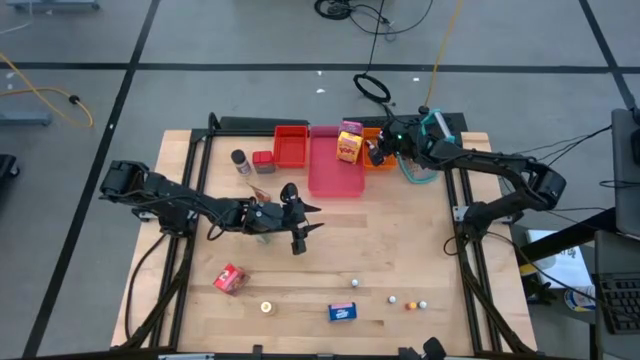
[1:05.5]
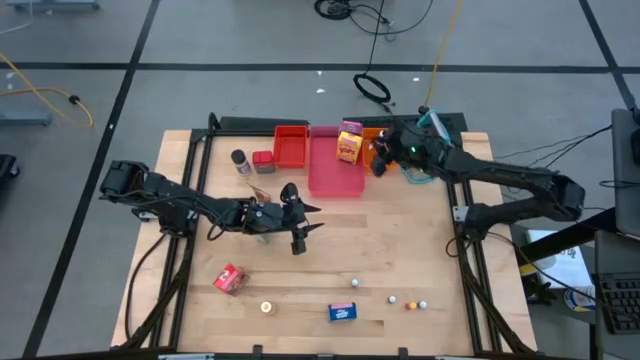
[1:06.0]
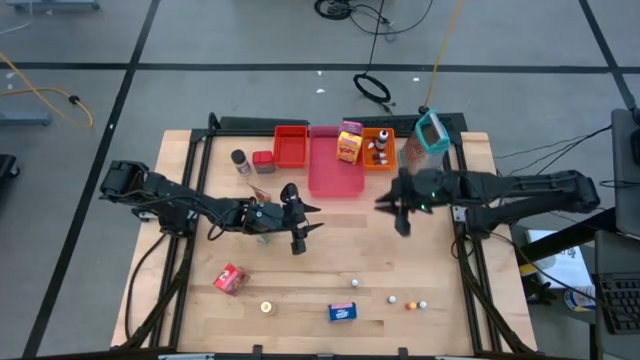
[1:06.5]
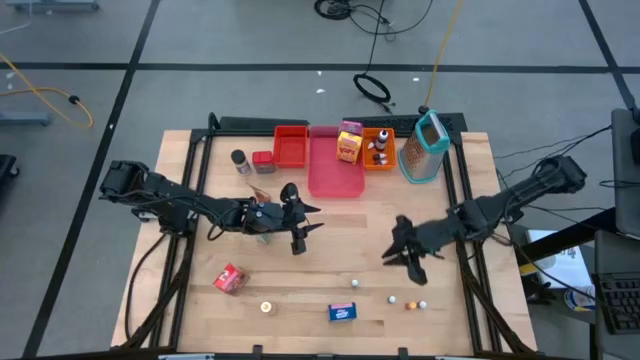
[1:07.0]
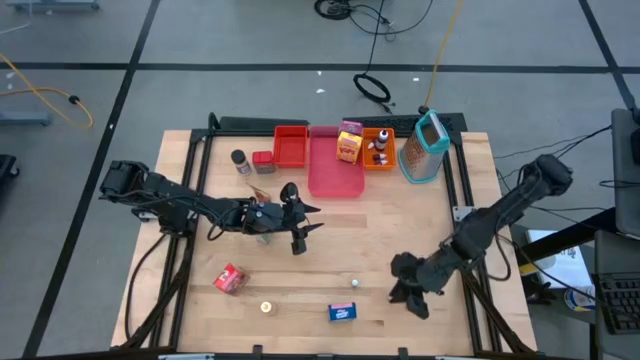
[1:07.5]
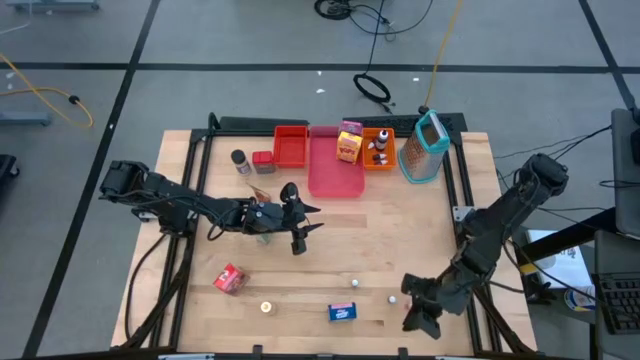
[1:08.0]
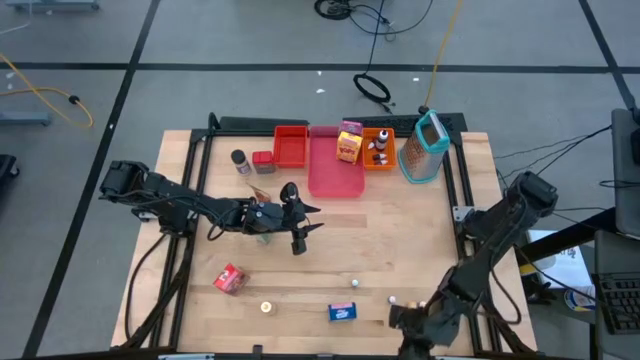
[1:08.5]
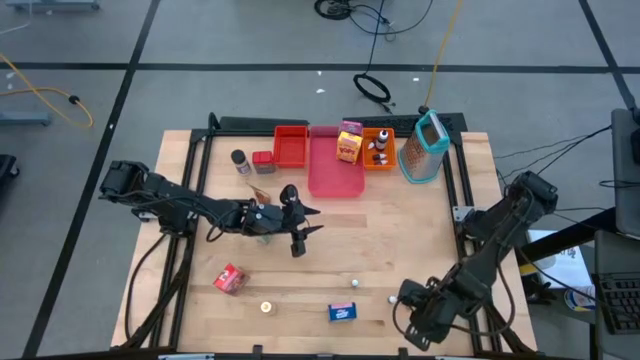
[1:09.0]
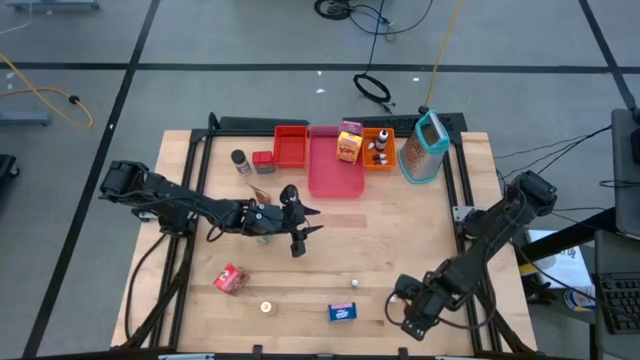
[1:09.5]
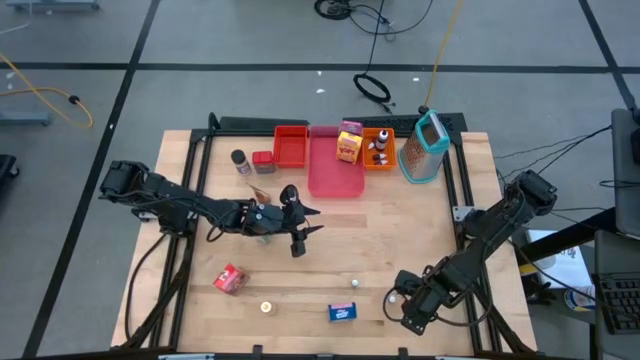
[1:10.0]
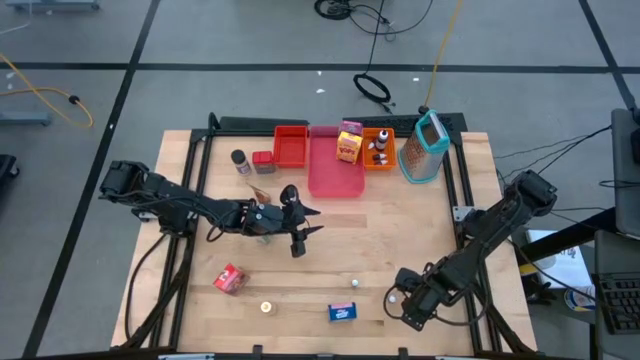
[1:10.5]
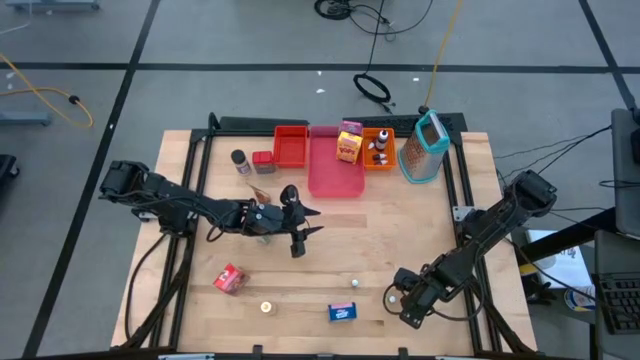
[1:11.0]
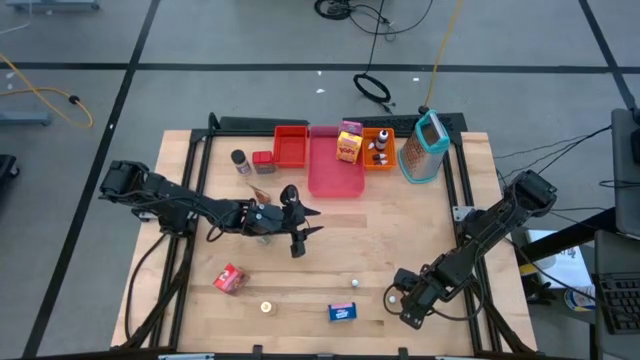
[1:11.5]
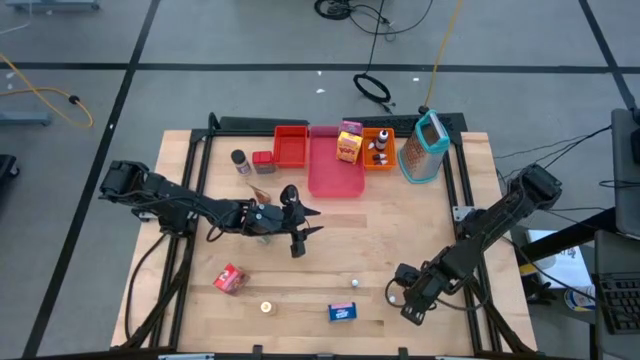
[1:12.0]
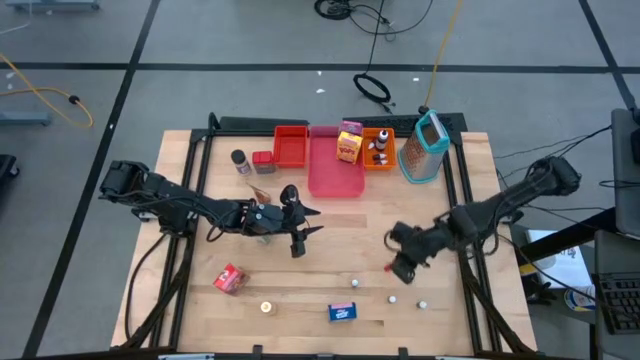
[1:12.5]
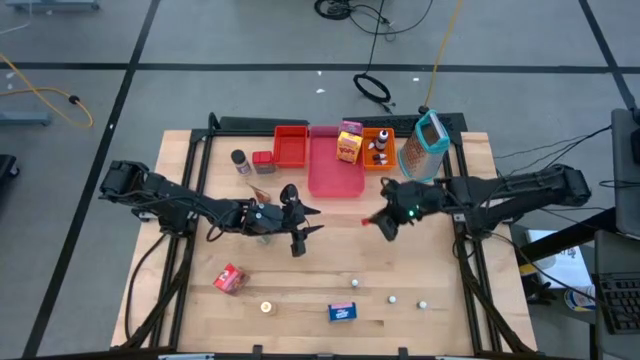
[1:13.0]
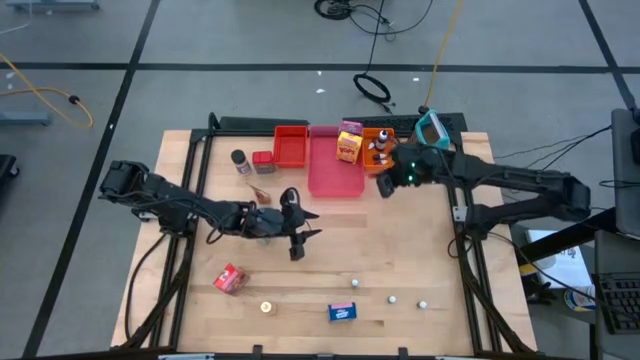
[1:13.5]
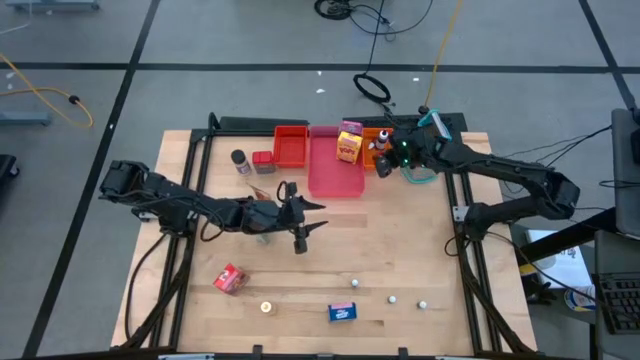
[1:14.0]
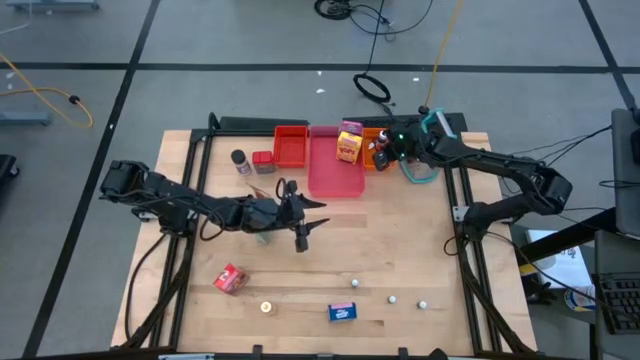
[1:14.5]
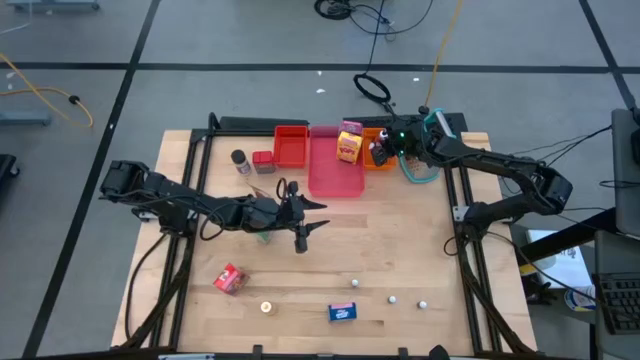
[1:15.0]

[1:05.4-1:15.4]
Task: Pick & Place Kitchen Items
Put the orange food coloring bottle into the orange bin

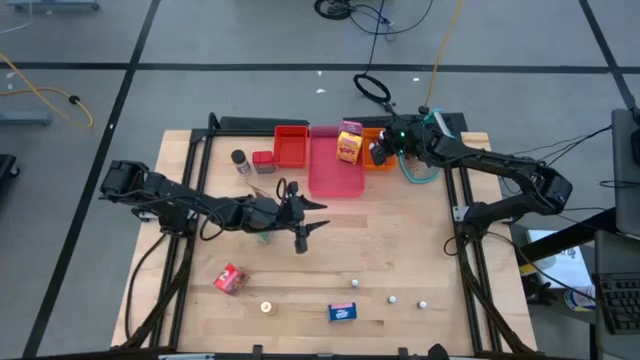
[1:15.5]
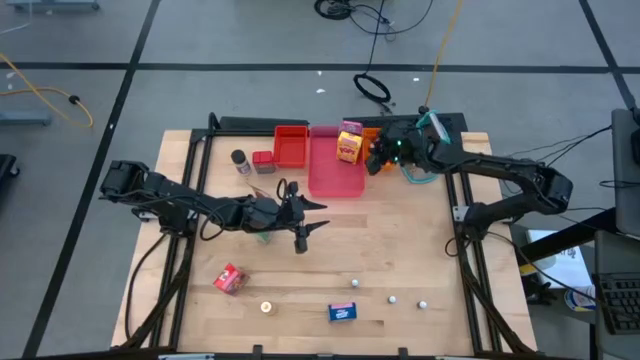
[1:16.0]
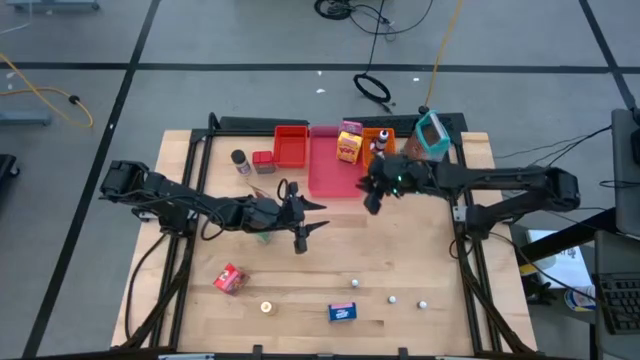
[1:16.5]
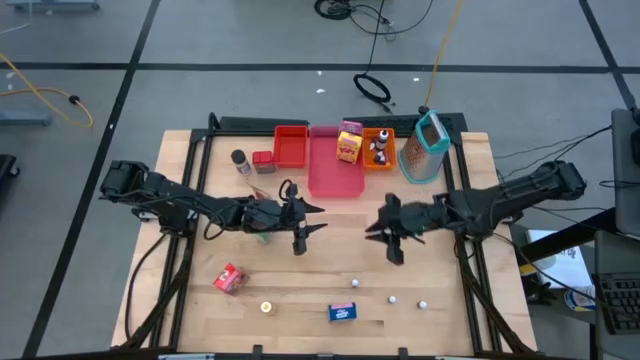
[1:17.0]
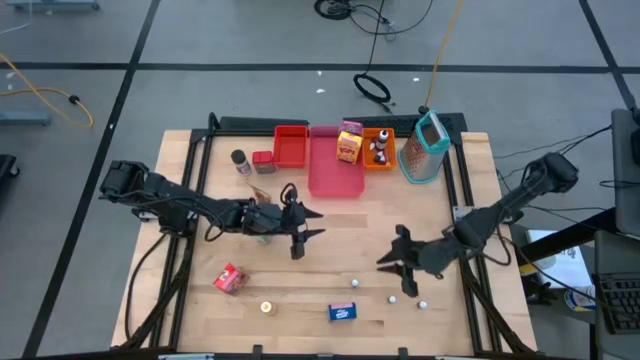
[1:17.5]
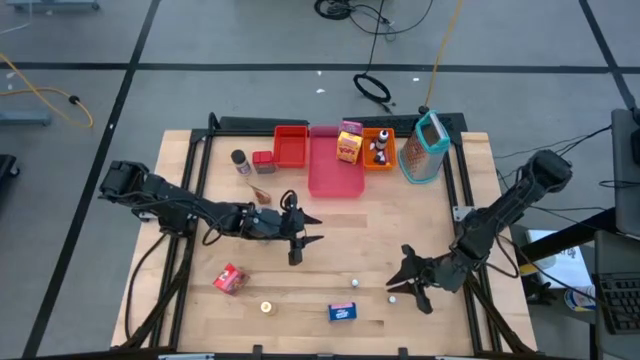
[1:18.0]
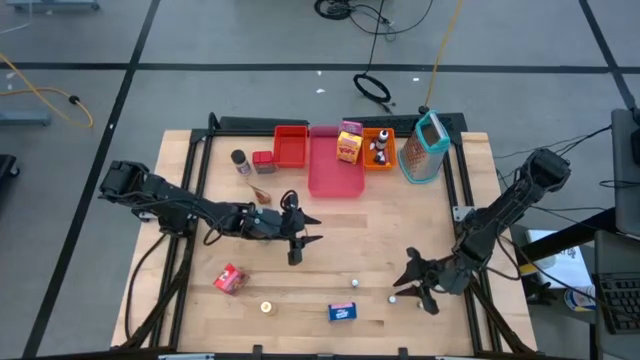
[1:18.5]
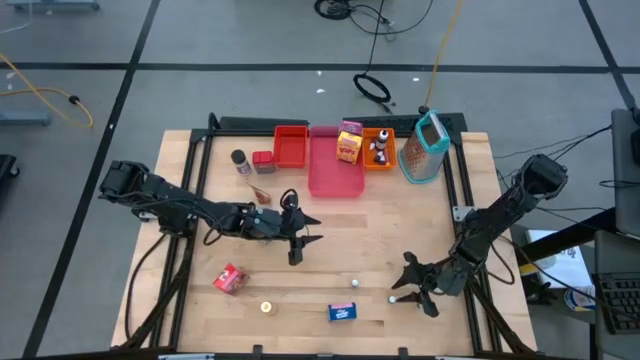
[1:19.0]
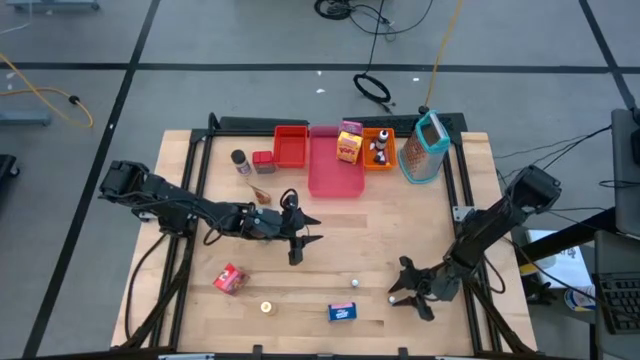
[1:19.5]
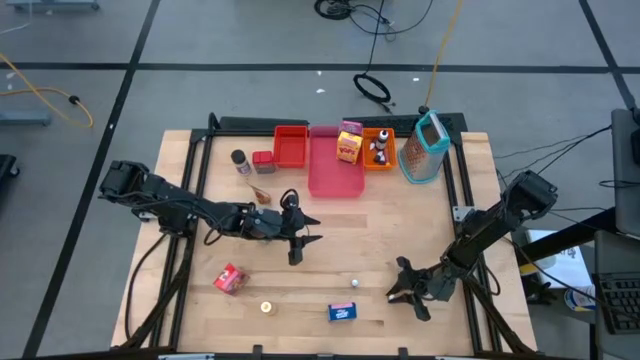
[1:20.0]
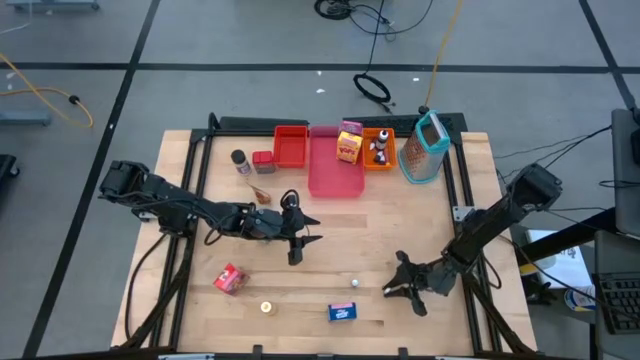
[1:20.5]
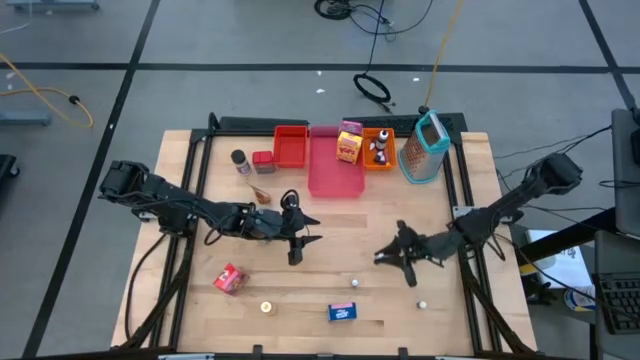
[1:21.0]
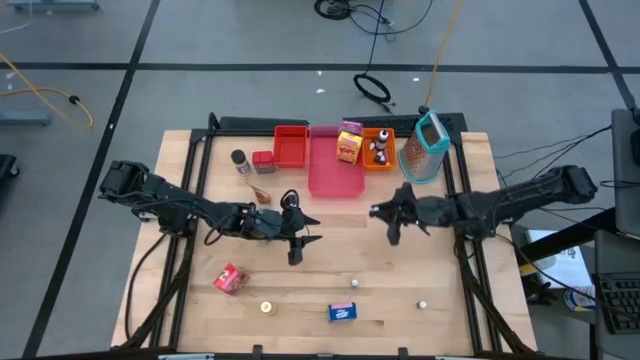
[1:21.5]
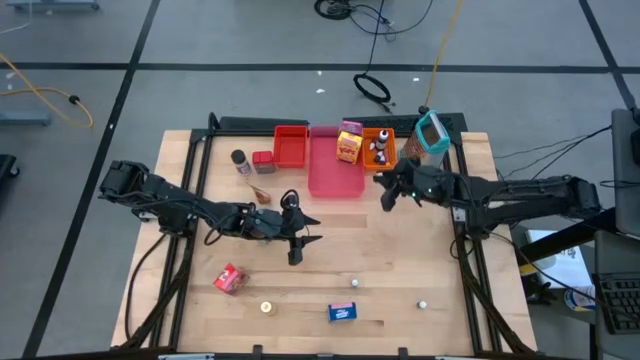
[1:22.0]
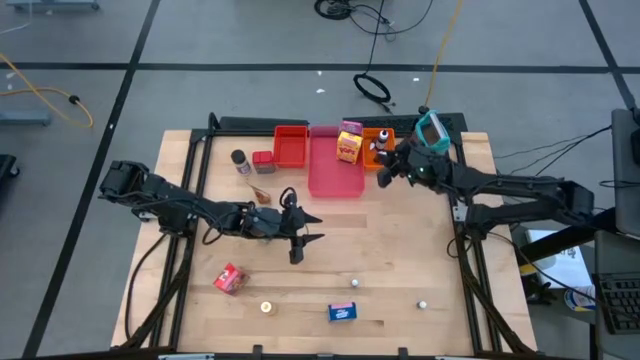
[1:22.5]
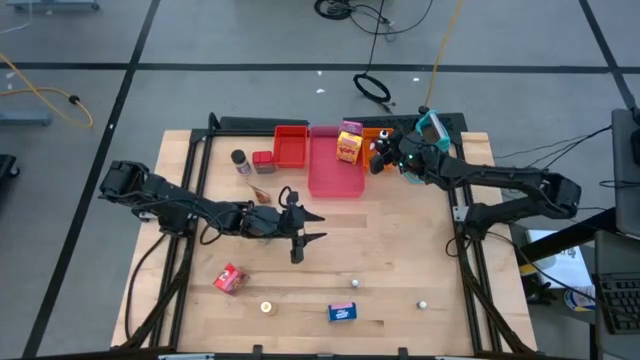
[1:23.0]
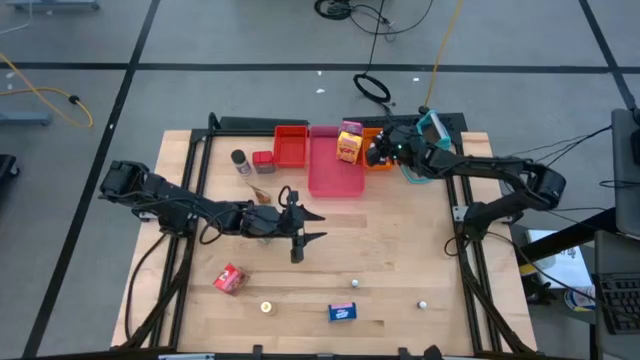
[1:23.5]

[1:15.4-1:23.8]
Put the black food coloring bottle into the orange bin

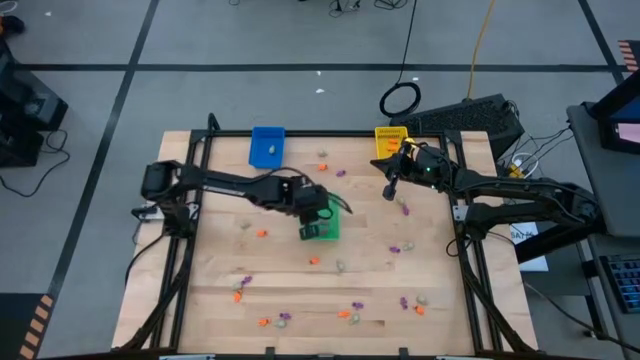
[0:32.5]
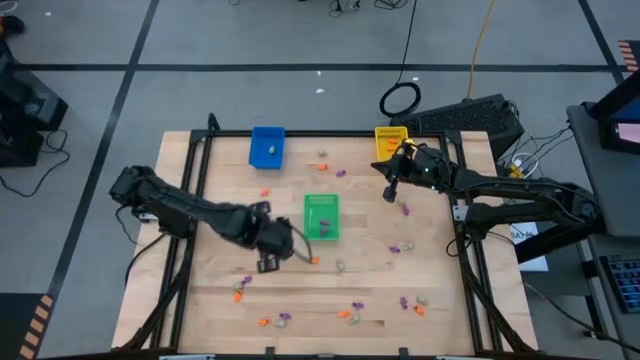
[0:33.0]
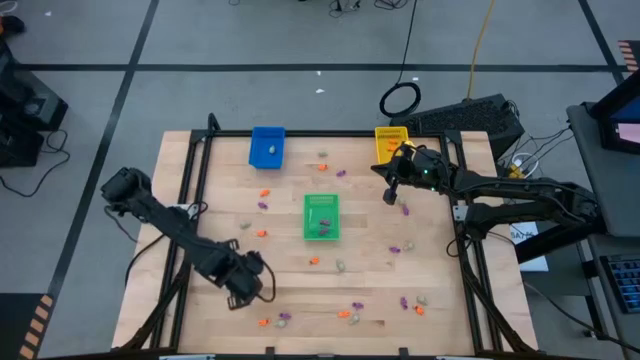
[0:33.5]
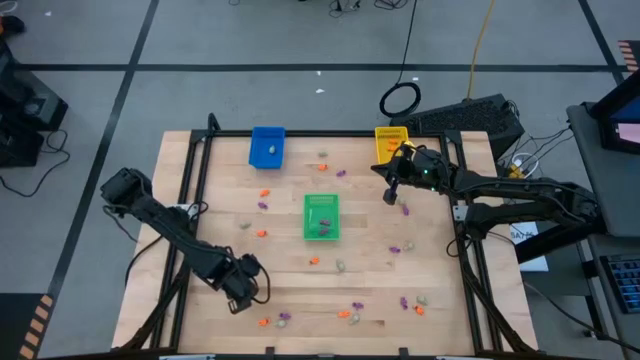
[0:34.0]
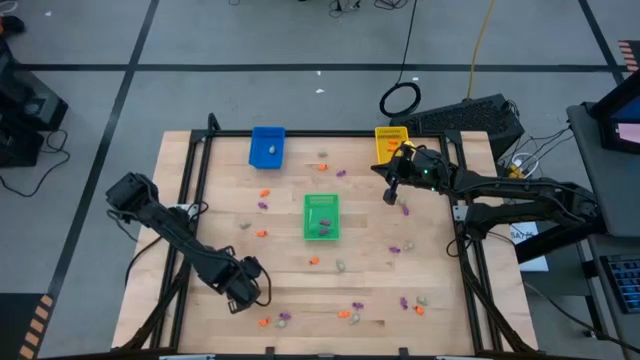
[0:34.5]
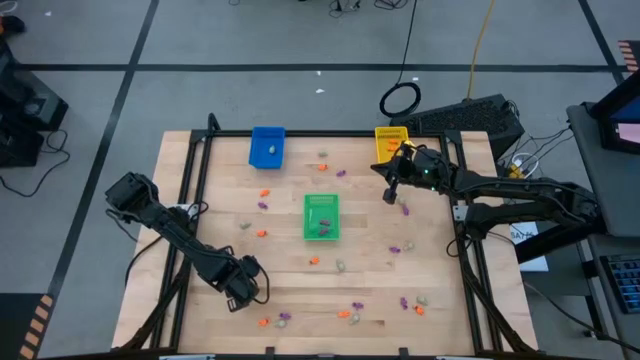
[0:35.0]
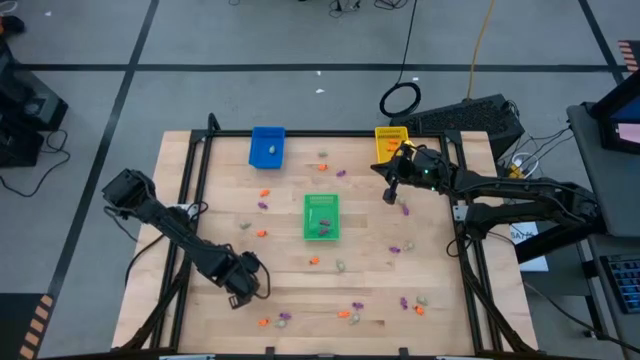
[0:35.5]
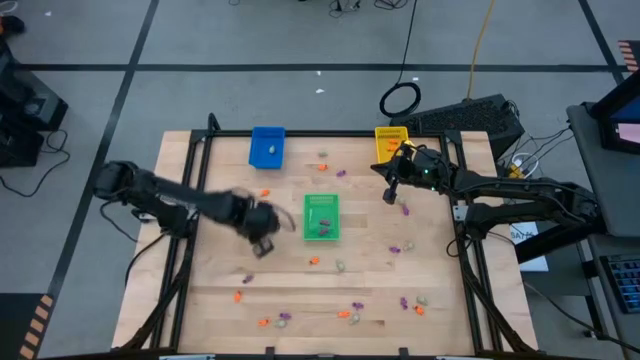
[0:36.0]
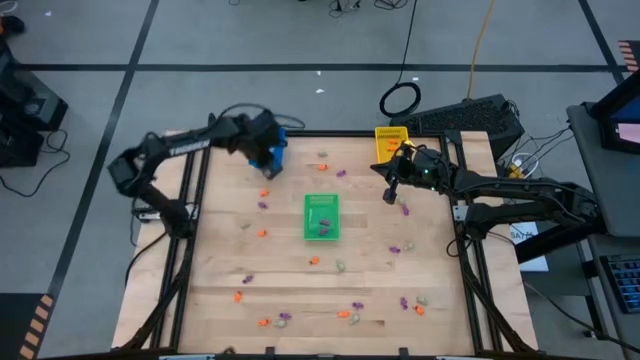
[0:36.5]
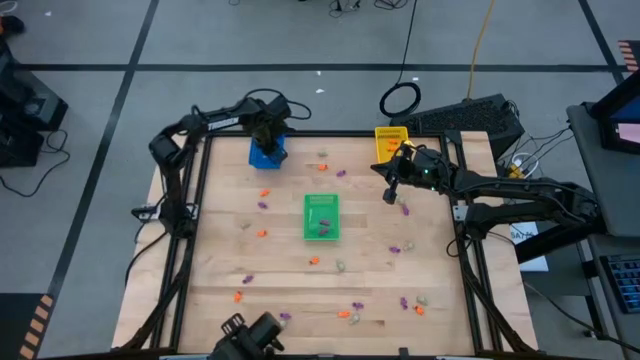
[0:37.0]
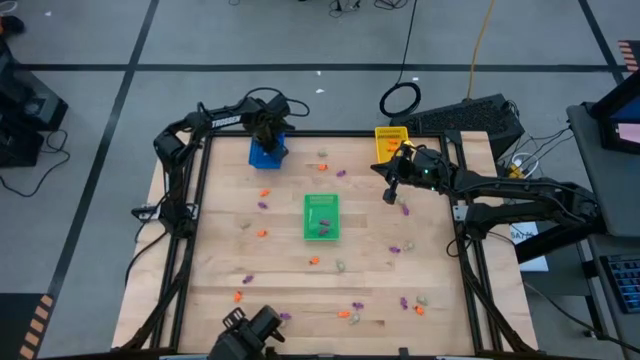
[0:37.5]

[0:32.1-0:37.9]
Task: Sort Halloween decoration
Put the white skull toy into the blue bin
